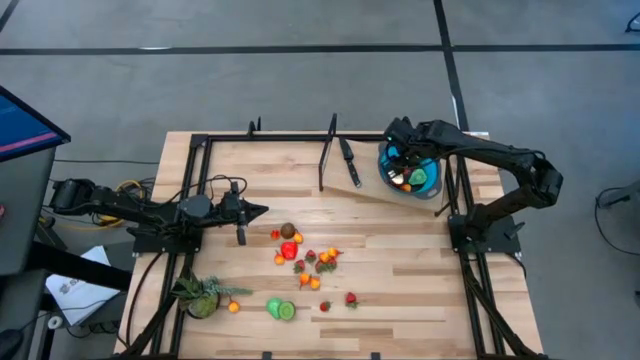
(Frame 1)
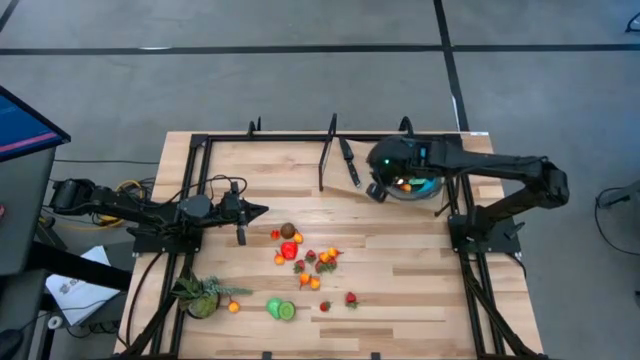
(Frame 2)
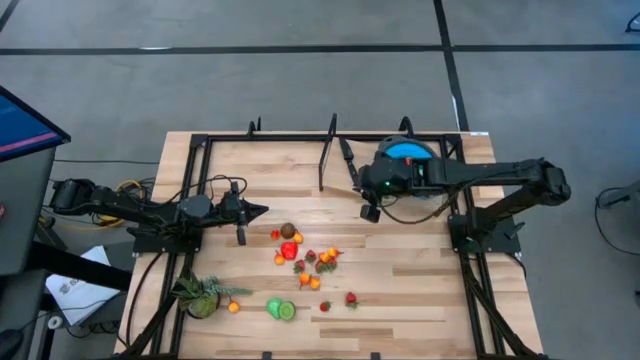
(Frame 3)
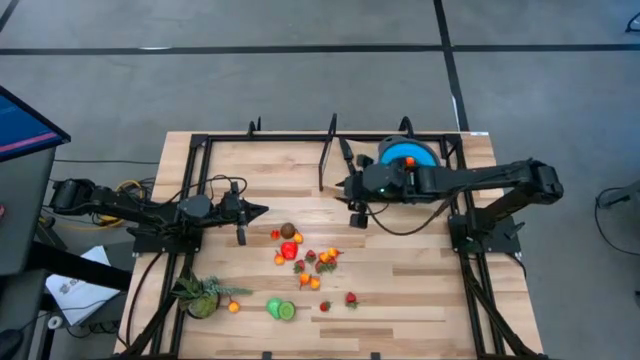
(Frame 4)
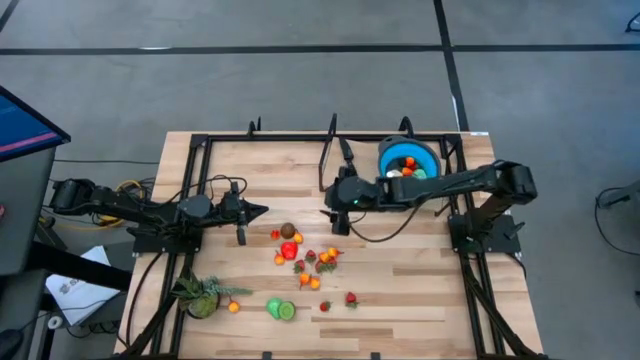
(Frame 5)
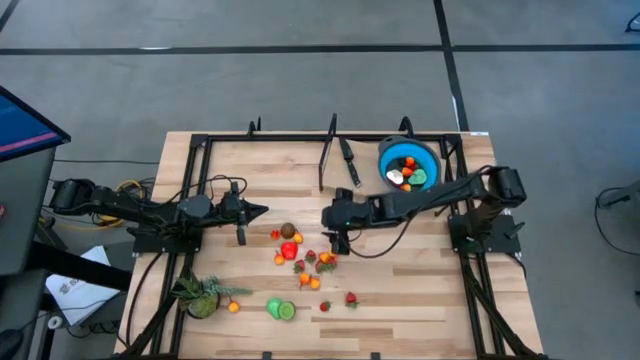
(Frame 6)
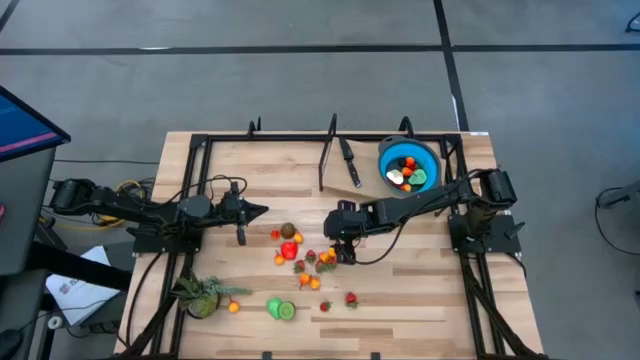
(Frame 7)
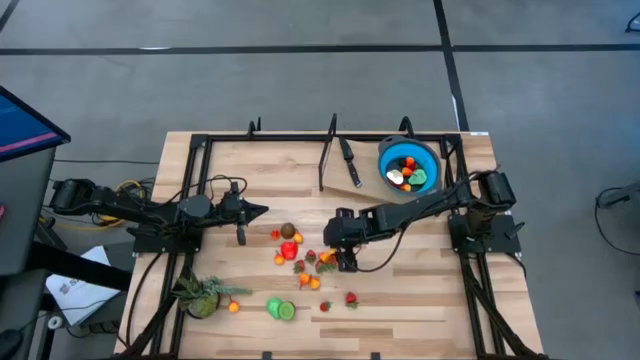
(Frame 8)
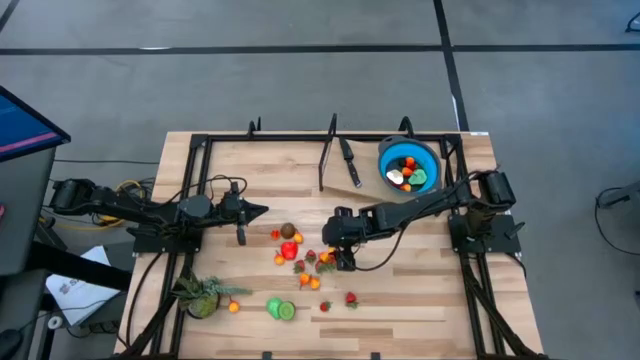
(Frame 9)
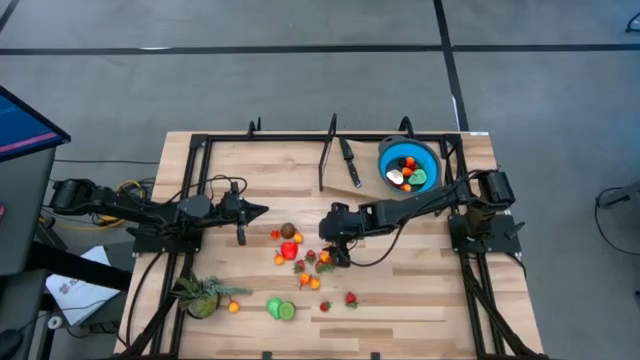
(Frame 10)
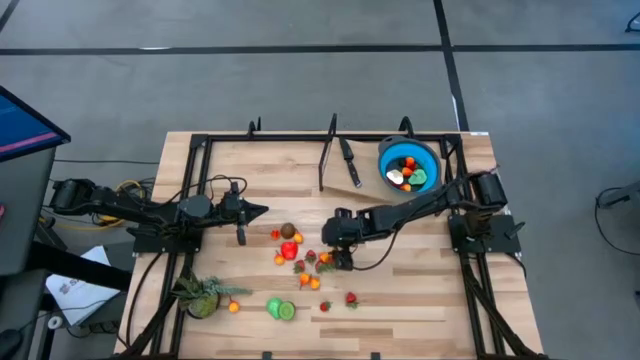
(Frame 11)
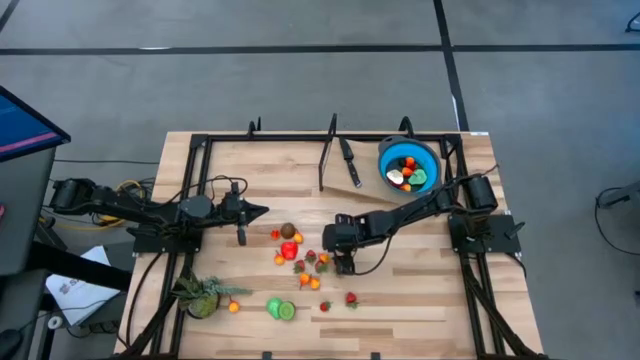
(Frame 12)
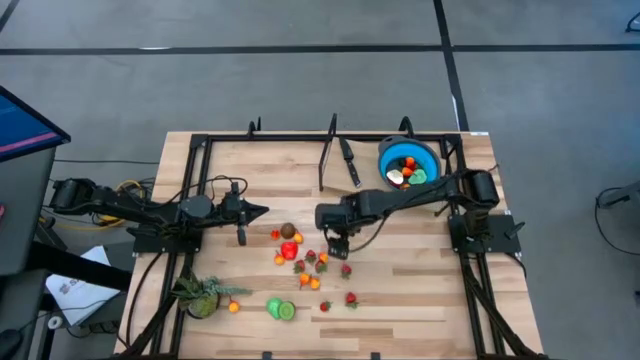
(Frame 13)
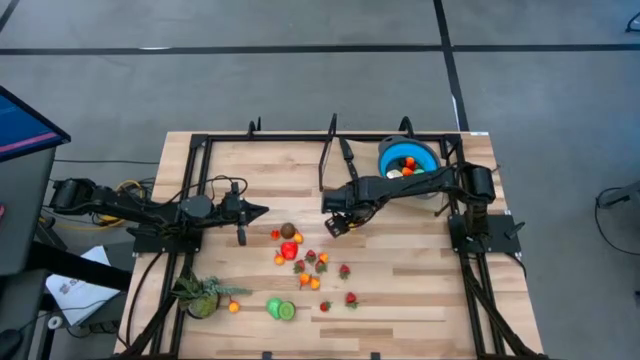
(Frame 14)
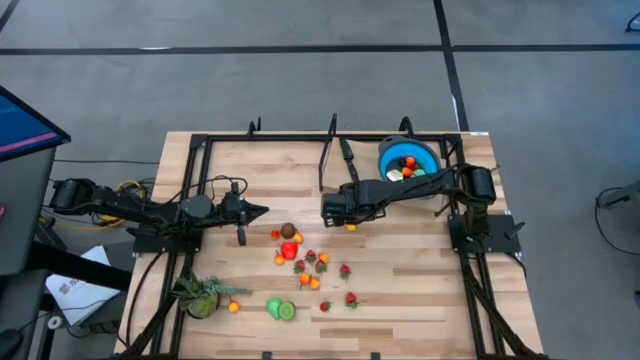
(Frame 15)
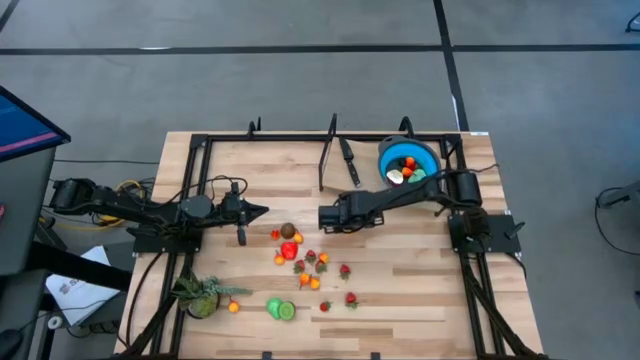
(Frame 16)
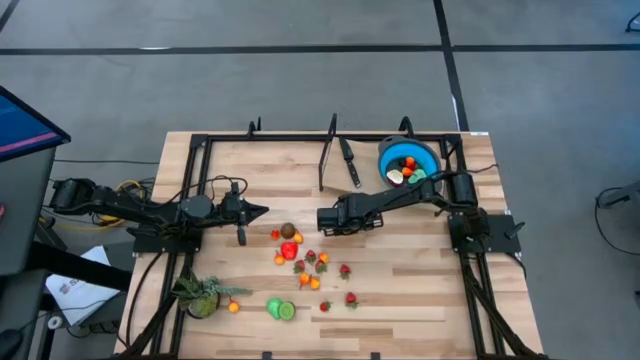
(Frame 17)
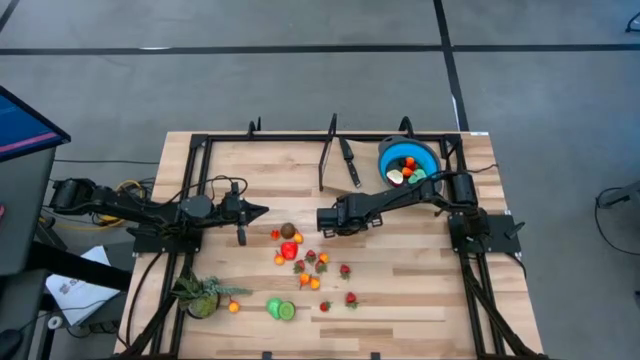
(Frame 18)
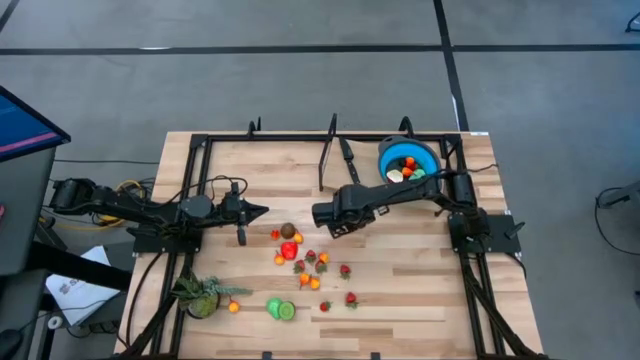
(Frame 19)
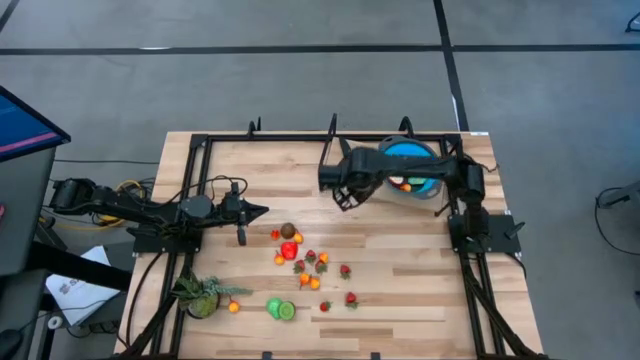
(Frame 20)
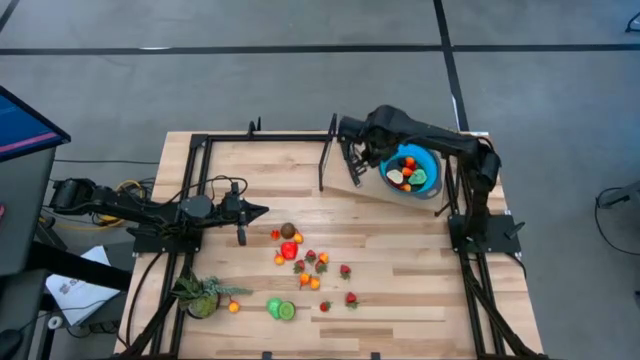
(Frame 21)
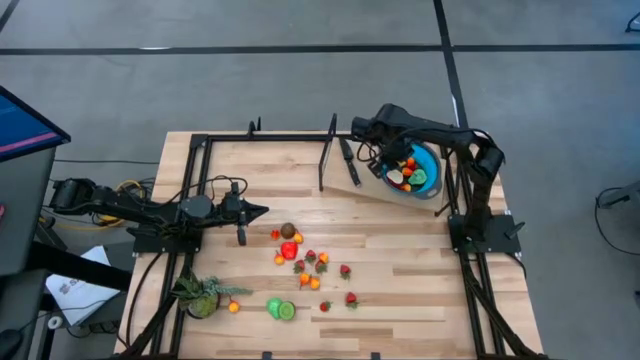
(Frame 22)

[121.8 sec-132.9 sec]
Task: Pick & Place Fruit
Put the orange pear into the blue colander

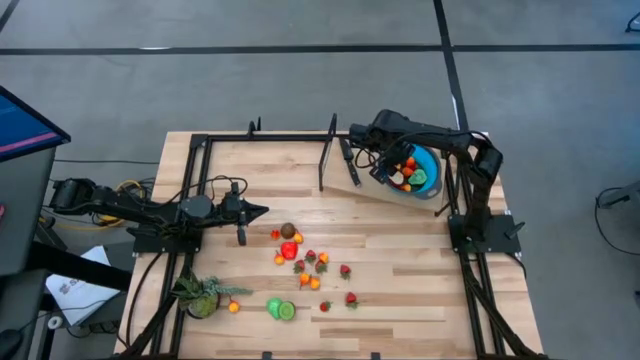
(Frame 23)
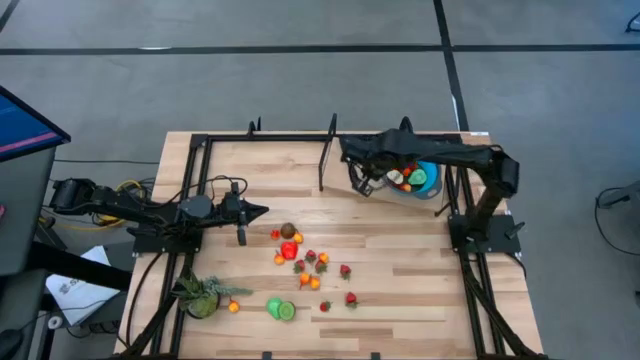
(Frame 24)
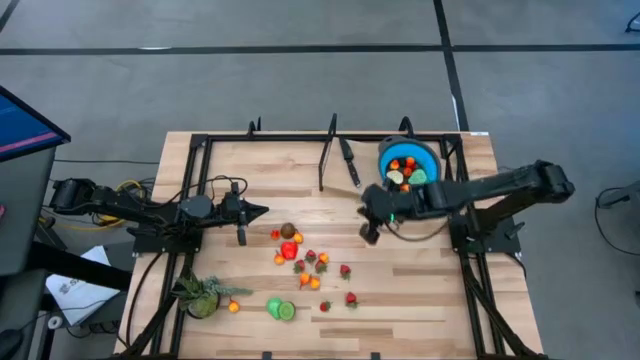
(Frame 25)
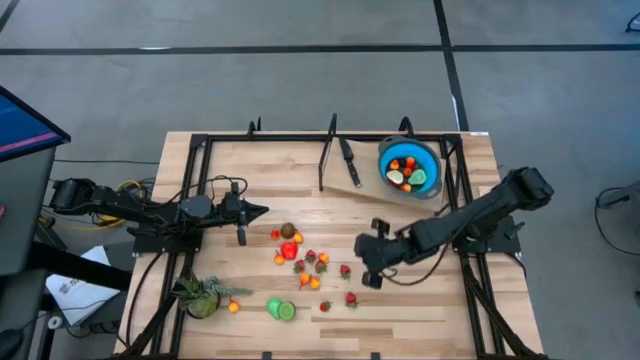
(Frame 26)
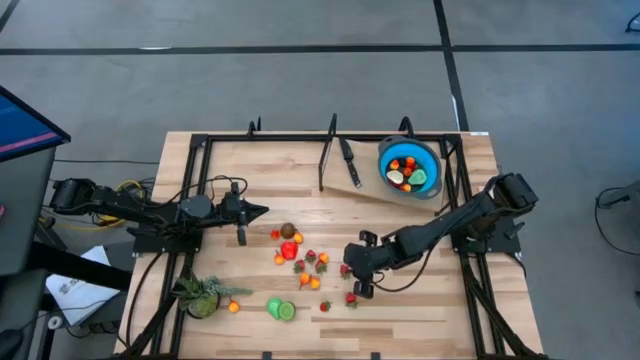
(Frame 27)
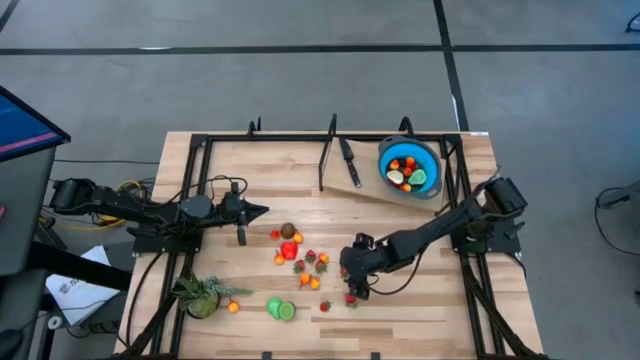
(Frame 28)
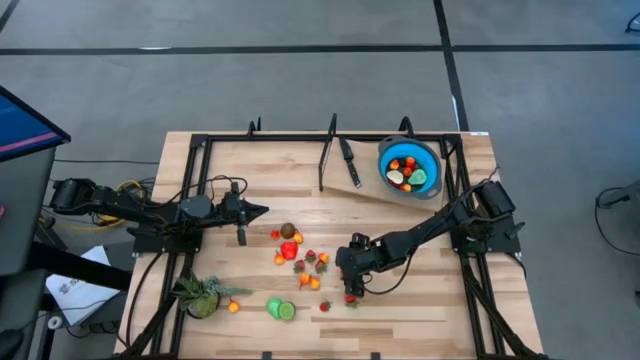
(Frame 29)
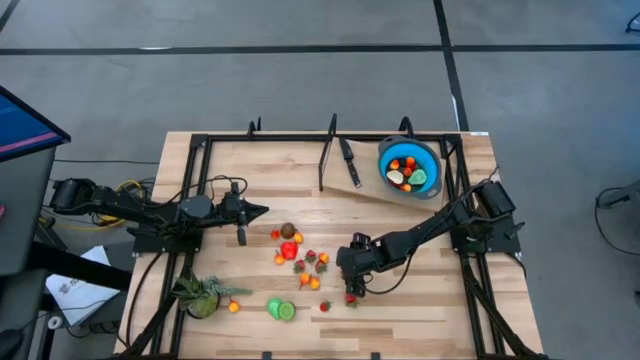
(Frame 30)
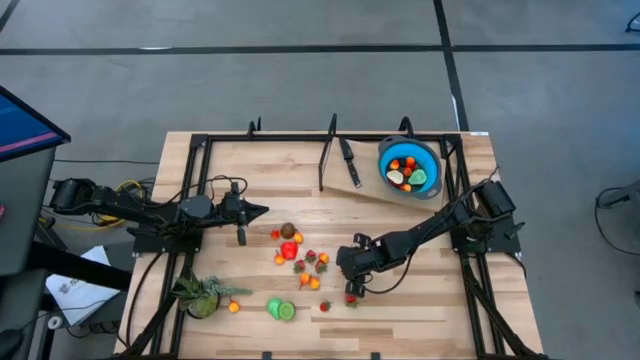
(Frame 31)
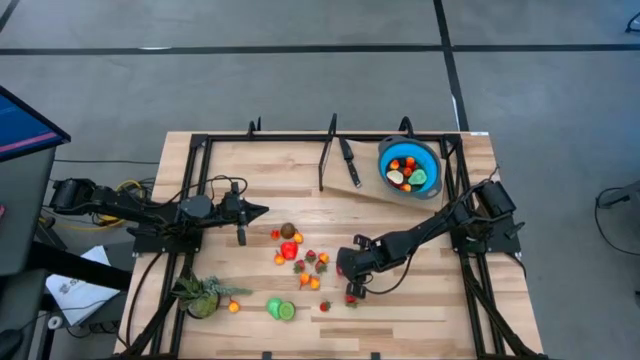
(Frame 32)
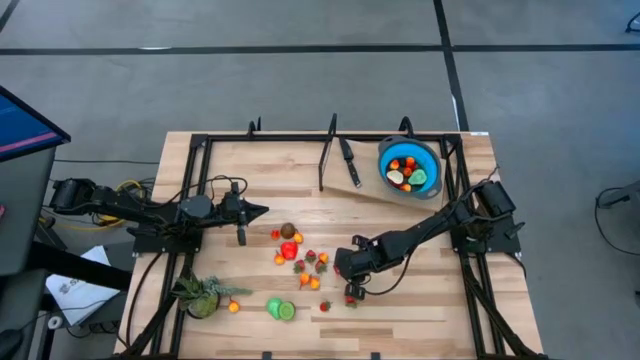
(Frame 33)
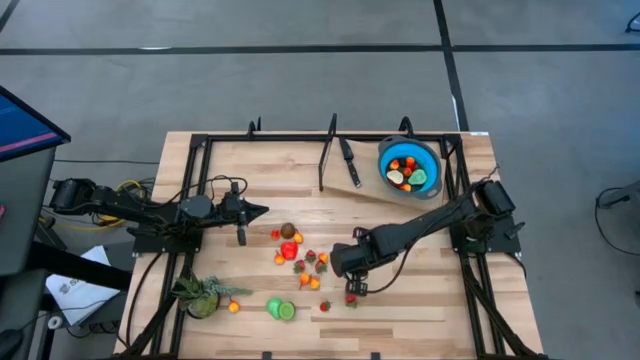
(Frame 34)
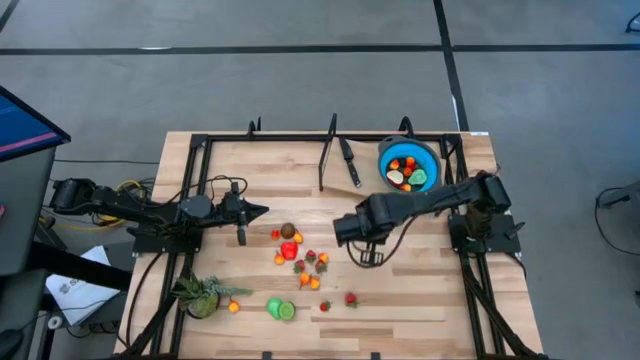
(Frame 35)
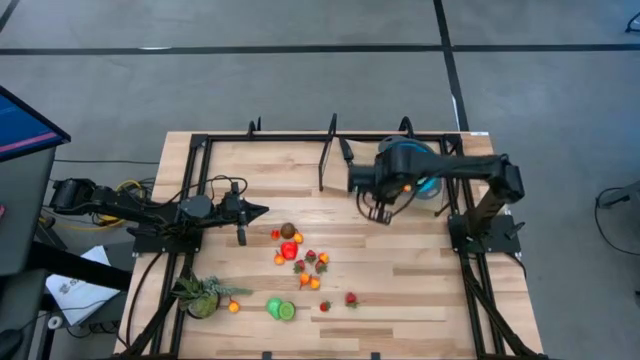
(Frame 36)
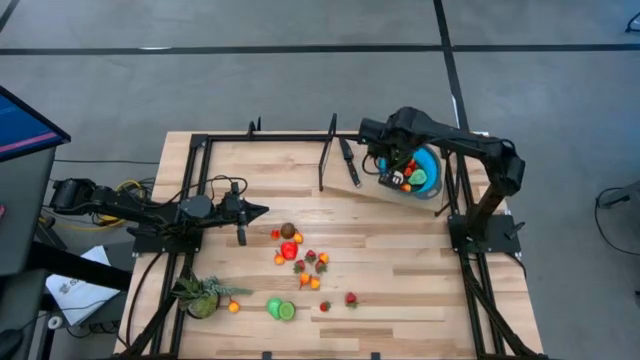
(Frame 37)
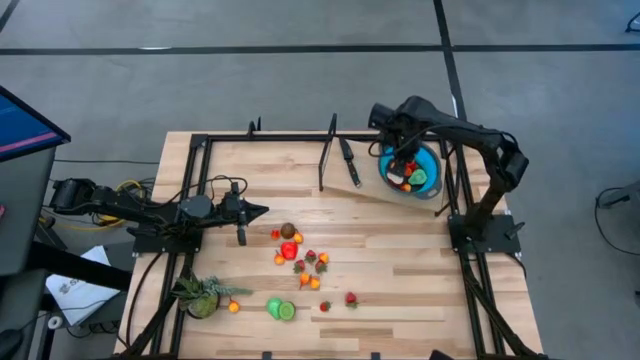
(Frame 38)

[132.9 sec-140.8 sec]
Put the red strawberry into the blue colander

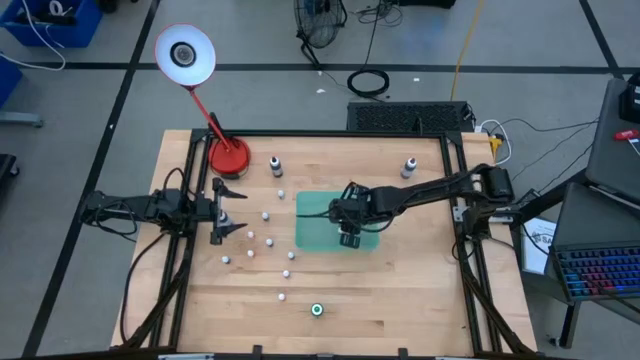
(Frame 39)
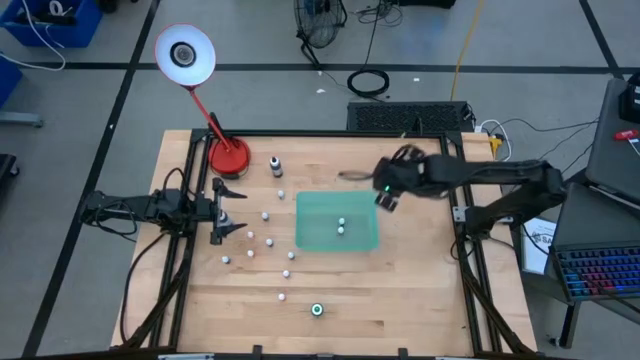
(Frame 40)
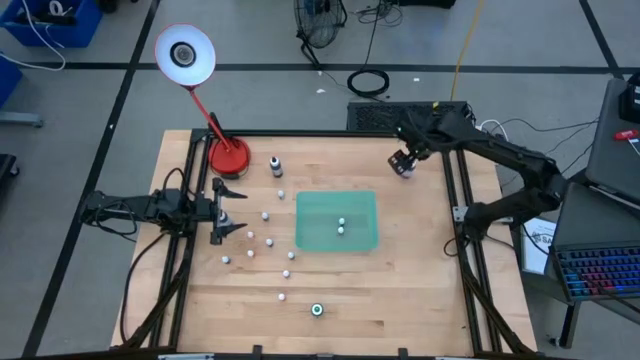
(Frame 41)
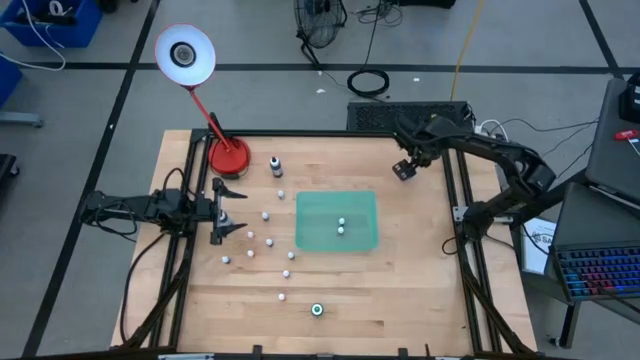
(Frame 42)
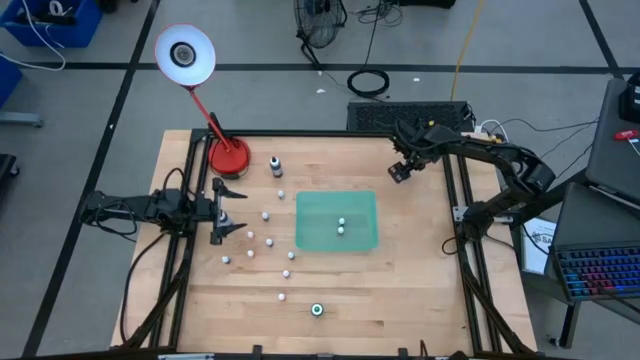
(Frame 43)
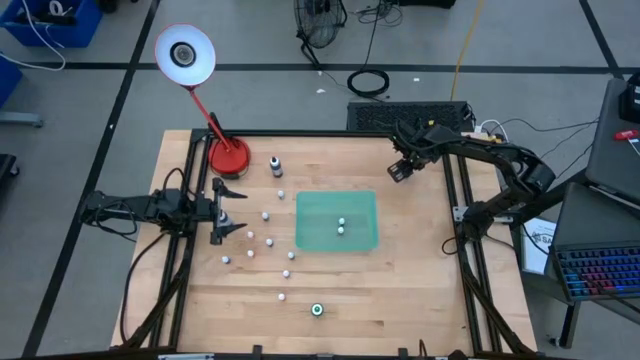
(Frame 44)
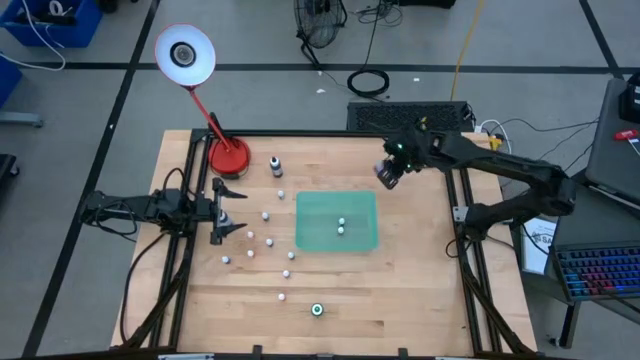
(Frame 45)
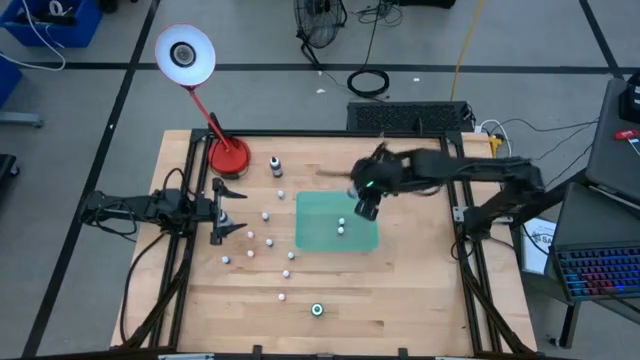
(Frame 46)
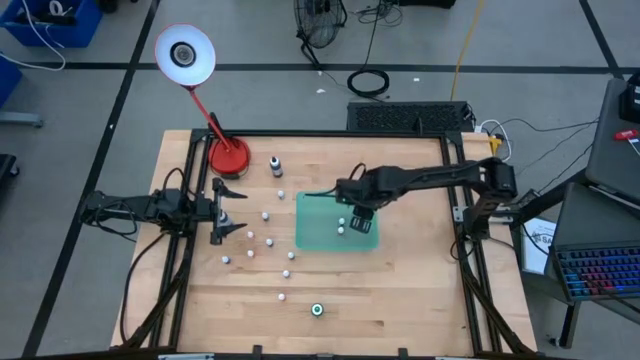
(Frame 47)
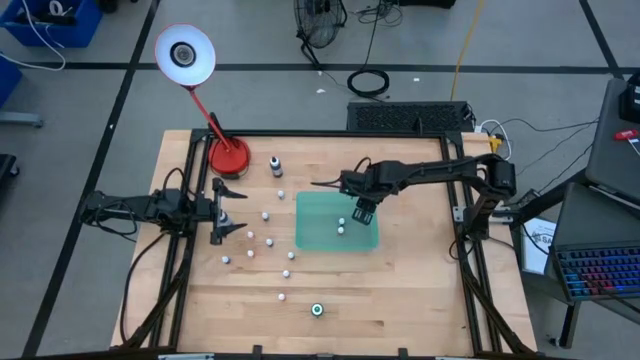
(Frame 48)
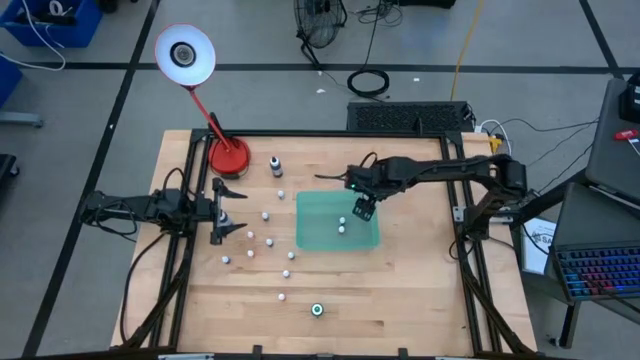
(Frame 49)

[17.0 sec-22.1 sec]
Task: Pick & Place food coloring
Put the big purple food coloring bottle into the blue bin
